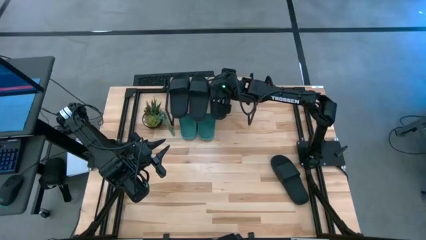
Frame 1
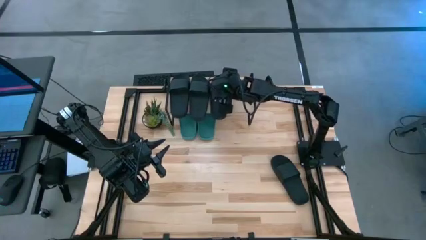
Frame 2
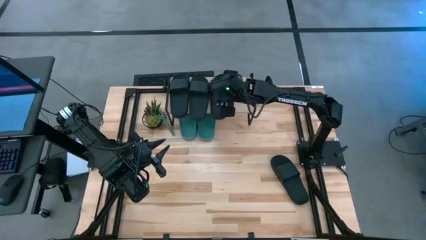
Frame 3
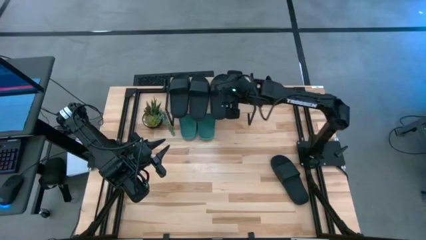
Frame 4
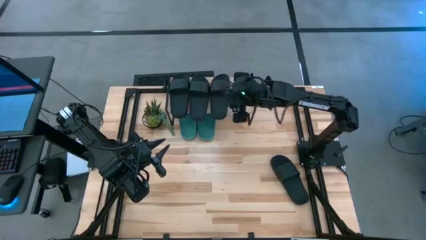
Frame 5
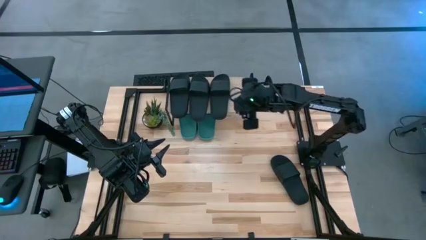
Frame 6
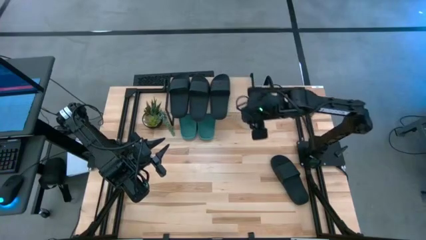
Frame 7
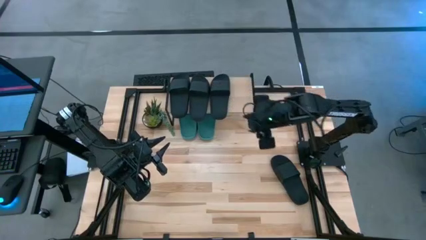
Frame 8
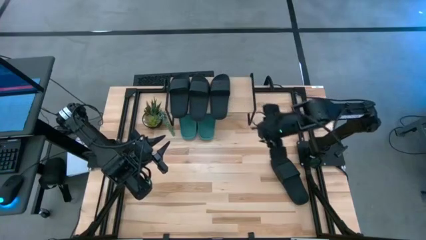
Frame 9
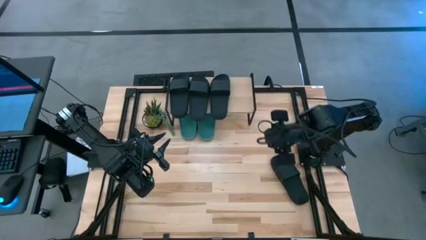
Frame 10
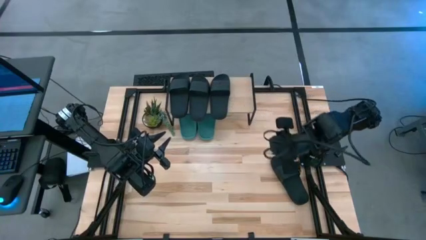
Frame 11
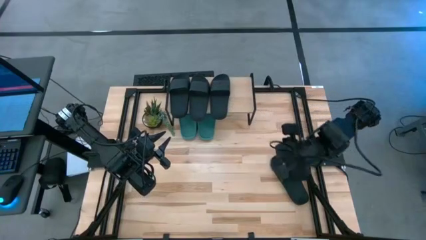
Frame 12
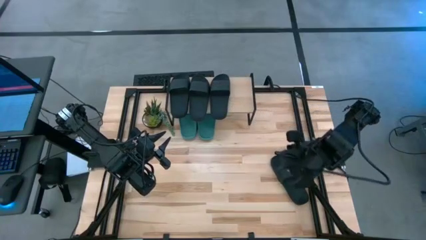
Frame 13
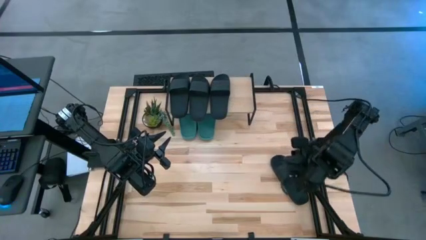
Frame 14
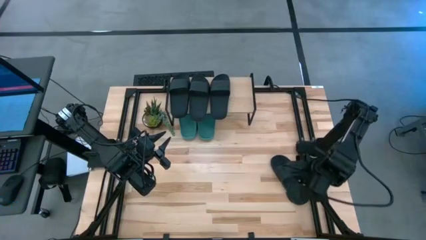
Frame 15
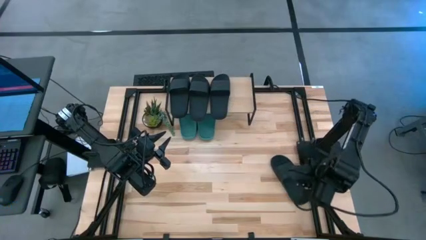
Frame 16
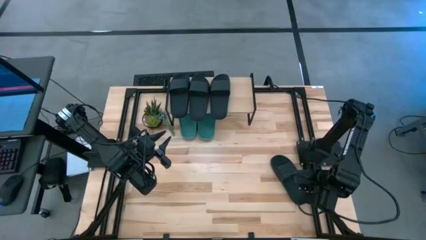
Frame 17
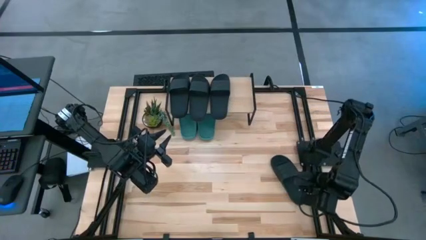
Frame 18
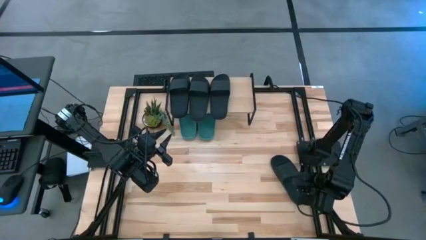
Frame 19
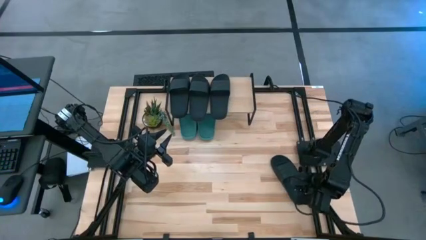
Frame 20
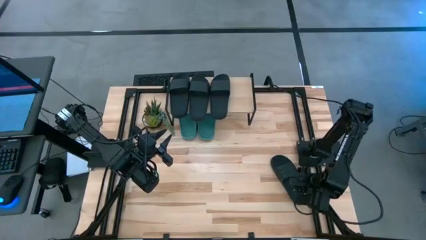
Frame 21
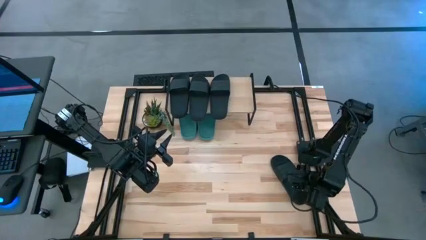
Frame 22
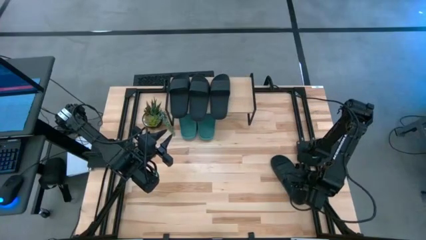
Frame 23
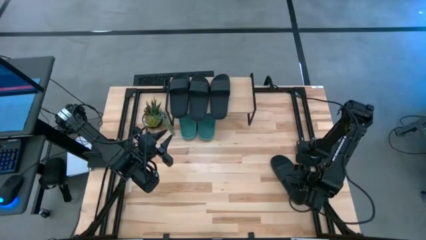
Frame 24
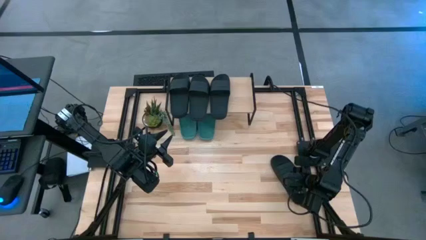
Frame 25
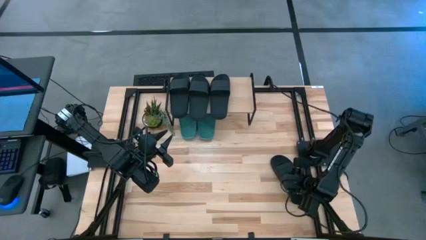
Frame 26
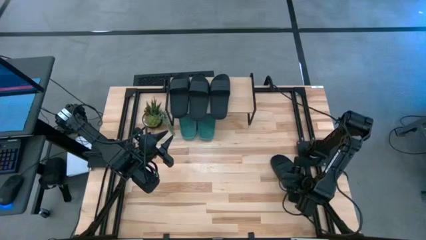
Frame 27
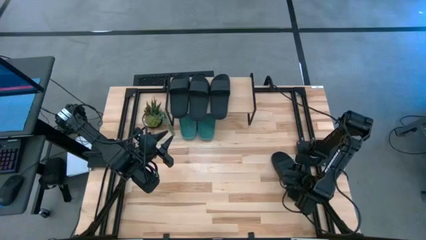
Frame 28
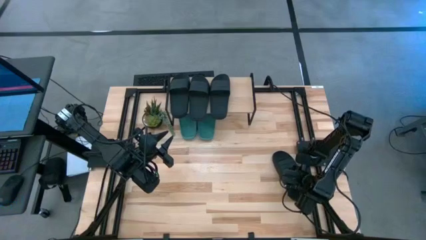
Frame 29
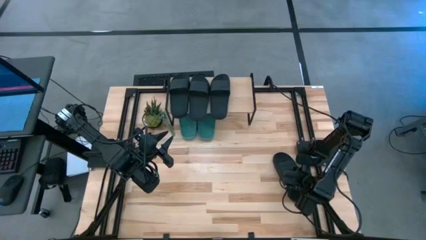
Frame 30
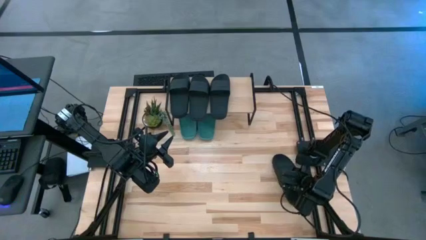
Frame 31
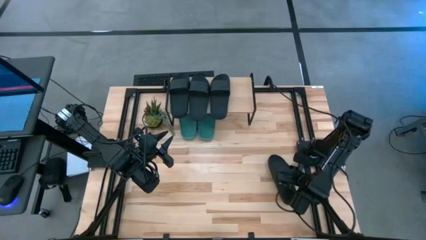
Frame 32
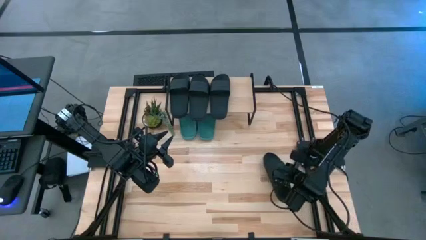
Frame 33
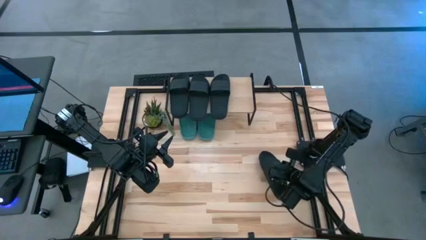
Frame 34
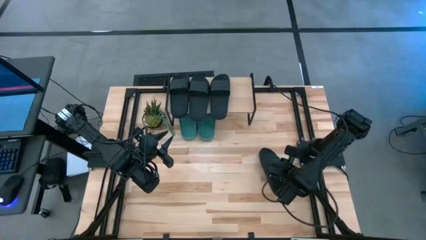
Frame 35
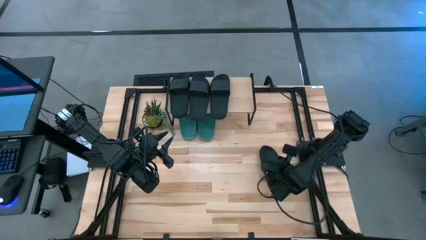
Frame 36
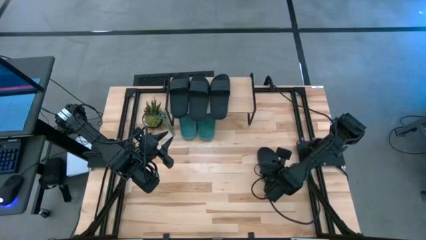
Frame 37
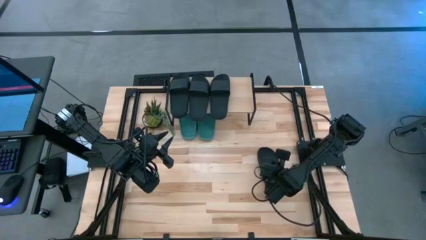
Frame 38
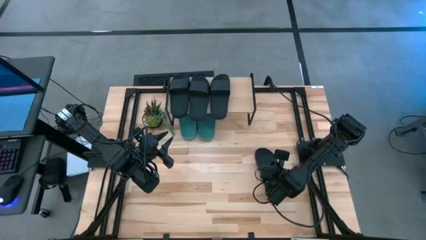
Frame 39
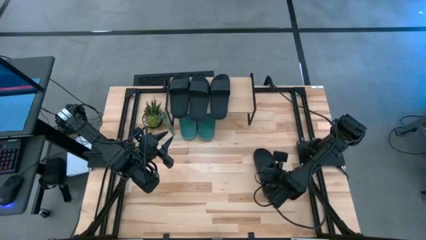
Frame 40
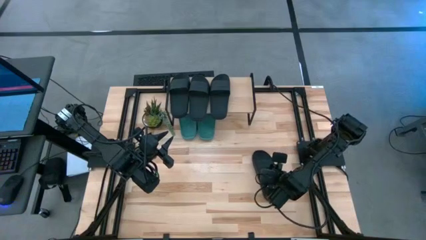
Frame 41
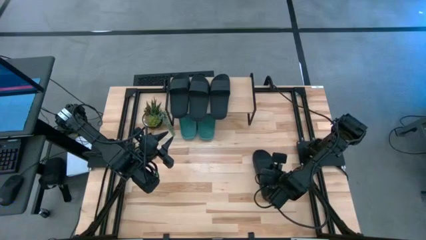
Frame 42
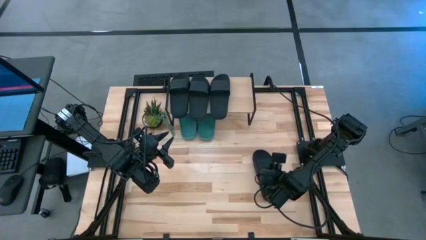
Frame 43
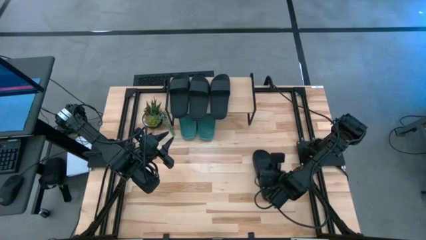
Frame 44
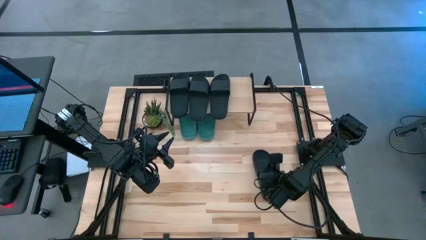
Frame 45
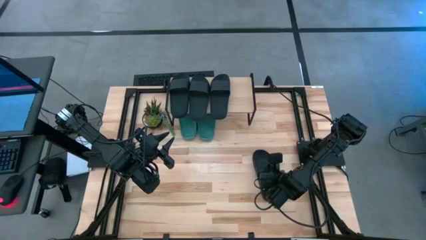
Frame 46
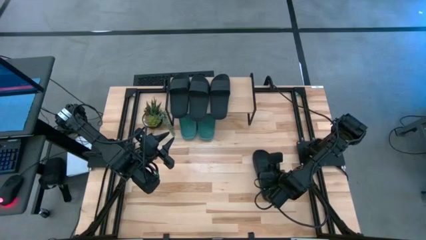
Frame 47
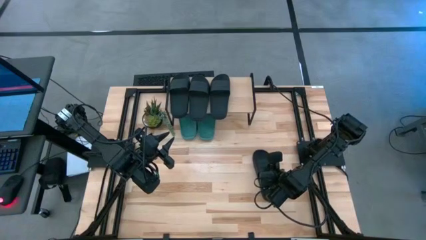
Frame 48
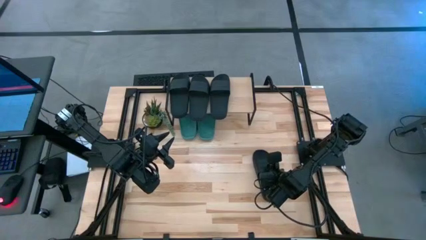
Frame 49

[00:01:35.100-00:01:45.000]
Task: Pick and place slides into the shelf
Put the black slide on the shelf

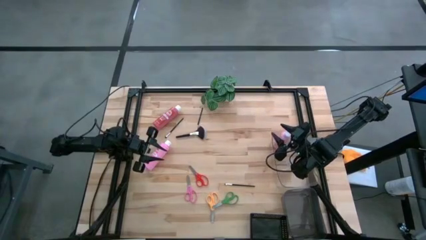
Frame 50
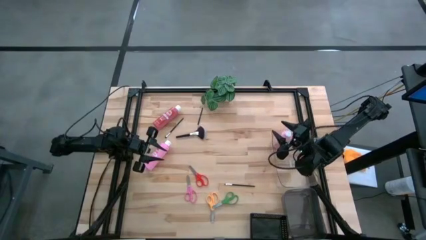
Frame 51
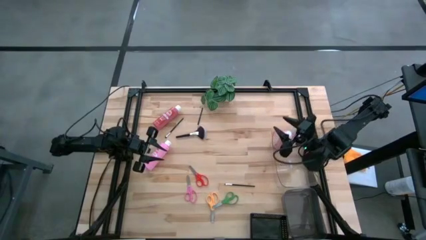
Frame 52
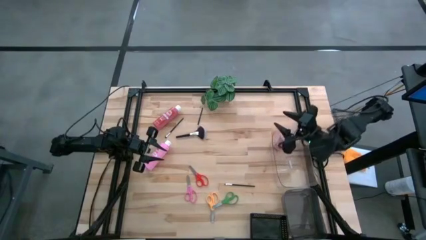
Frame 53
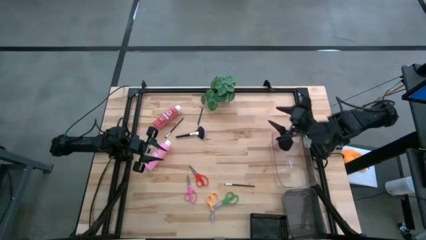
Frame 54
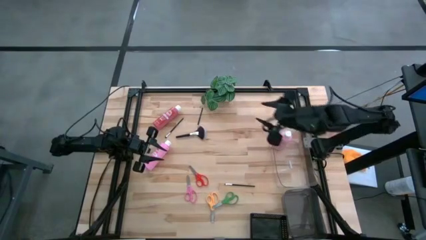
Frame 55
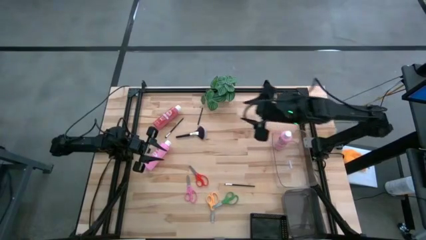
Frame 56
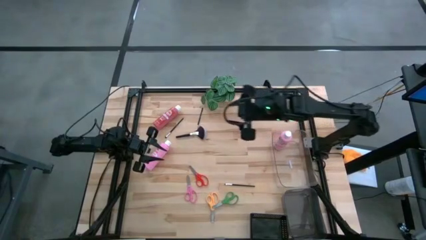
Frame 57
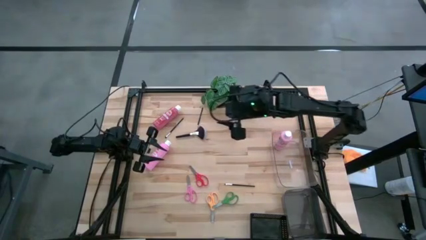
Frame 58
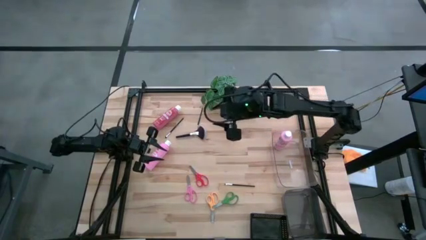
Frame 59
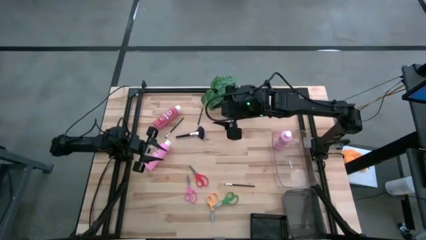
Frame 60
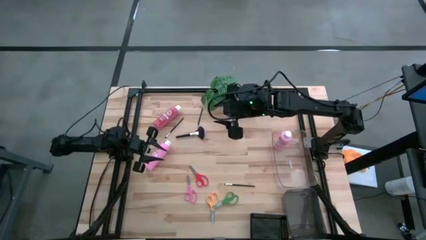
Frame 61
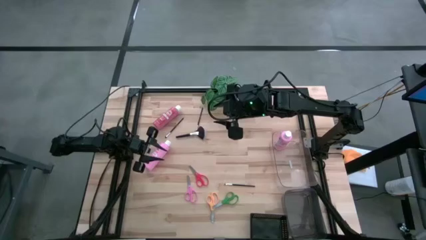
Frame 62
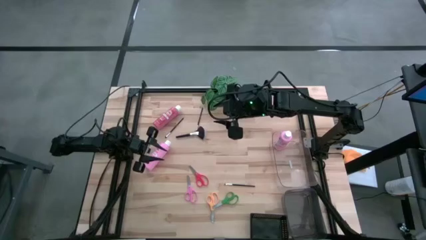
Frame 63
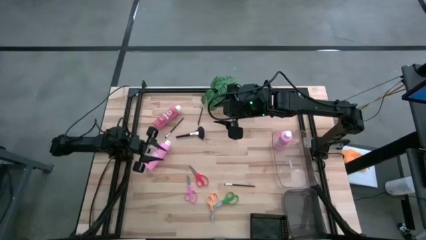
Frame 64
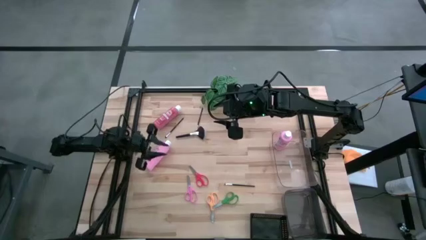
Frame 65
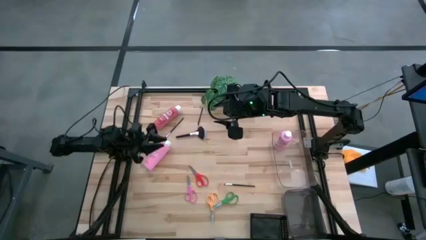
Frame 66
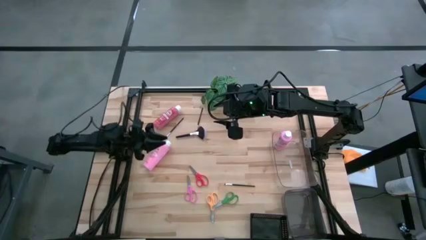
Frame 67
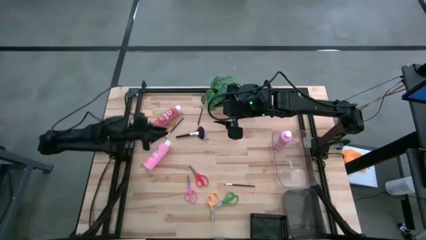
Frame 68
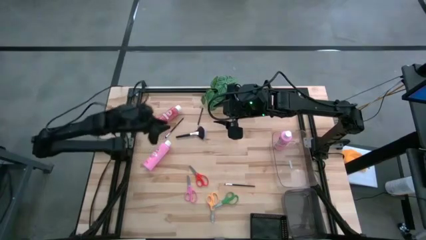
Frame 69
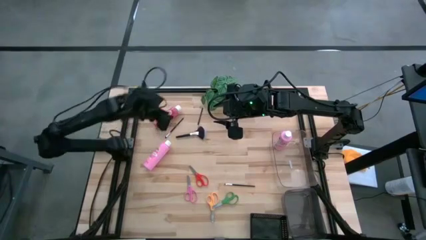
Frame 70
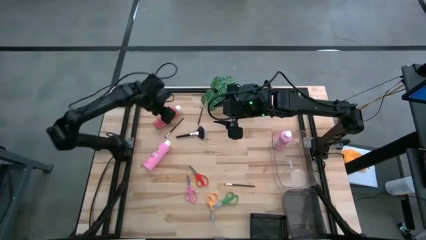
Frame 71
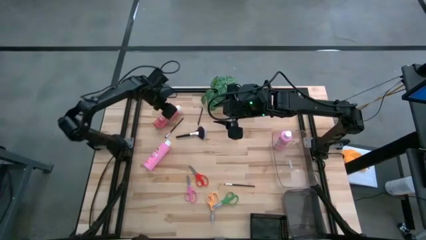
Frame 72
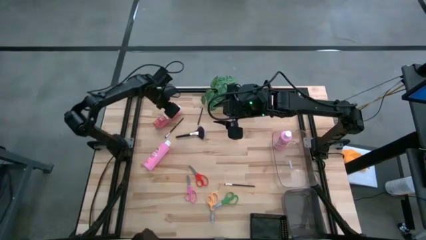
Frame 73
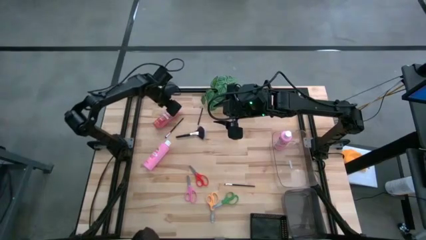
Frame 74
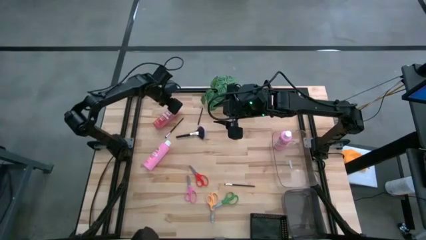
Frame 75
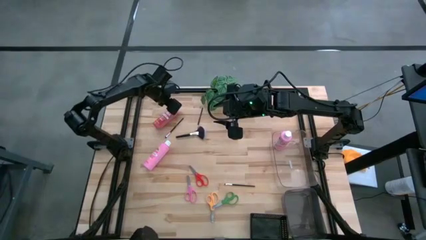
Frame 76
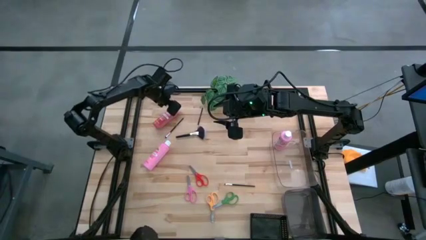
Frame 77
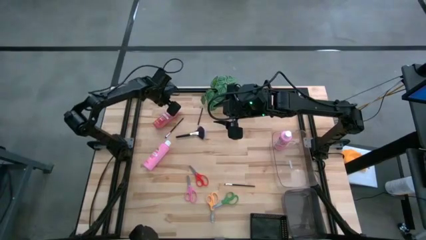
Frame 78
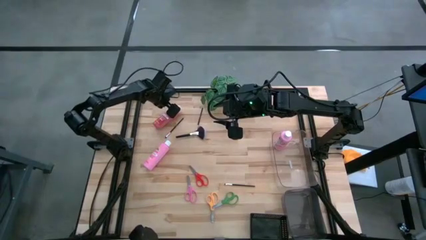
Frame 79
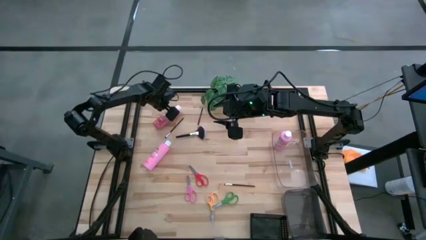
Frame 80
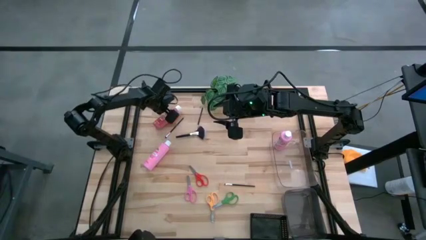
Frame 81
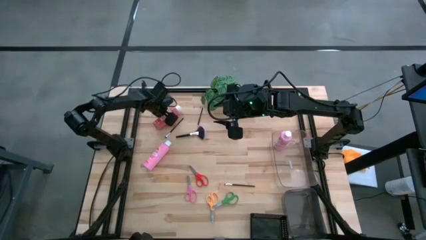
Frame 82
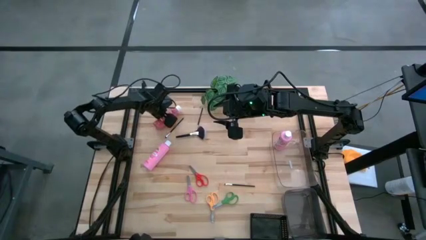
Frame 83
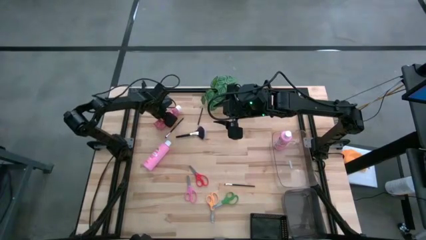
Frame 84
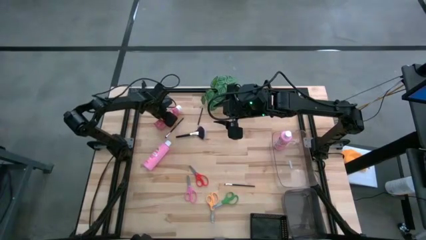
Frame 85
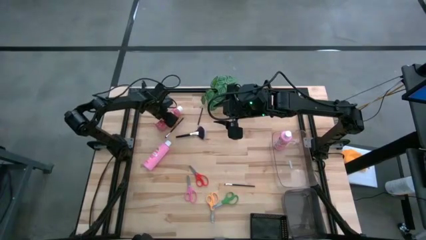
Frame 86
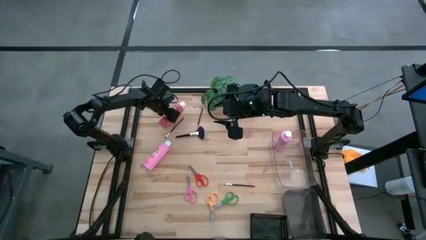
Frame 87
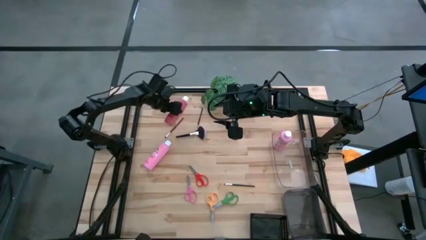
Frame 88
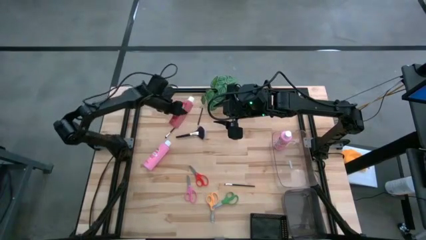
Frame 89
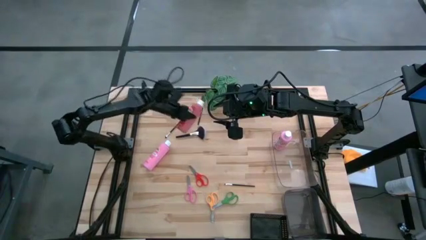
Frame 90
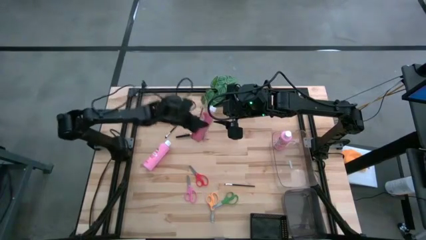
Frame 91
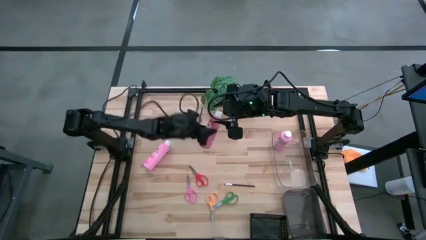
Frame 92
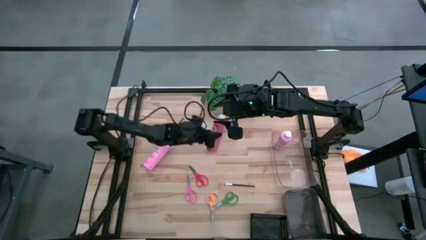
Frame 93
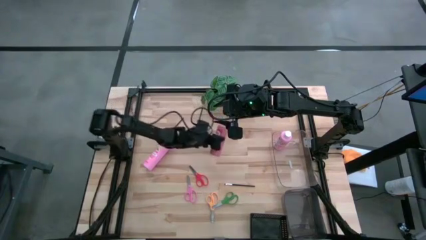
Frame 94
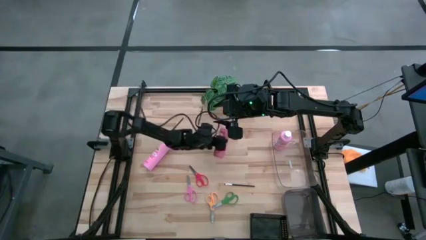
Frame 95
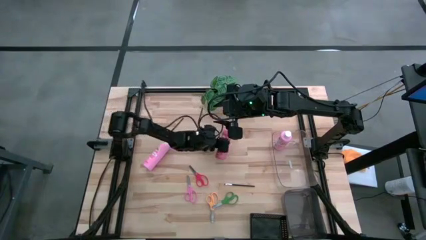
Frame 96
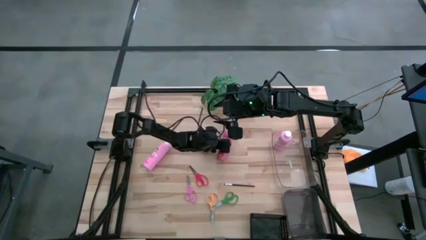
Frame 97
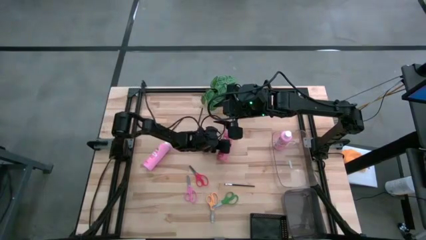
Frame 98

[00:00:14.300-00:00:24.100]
Task: Pick & Place Paint Supplies
Put the red paint bottle into the transparent bin
